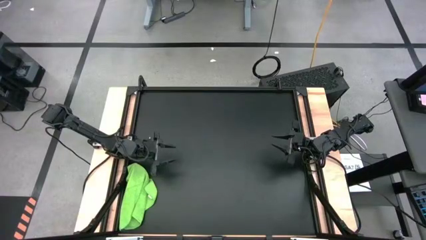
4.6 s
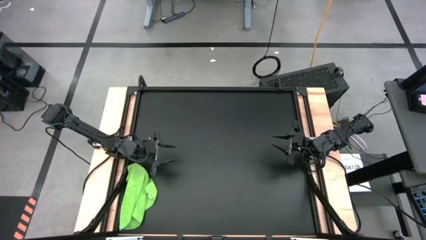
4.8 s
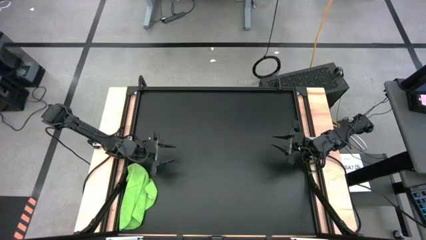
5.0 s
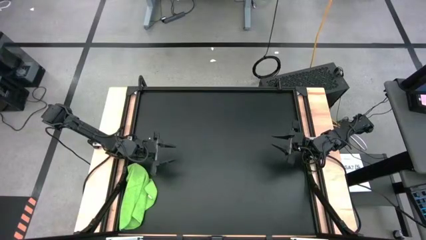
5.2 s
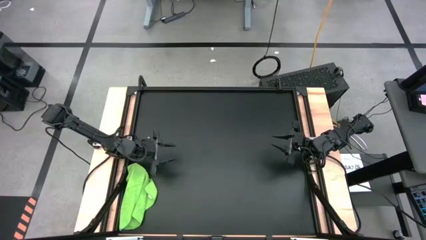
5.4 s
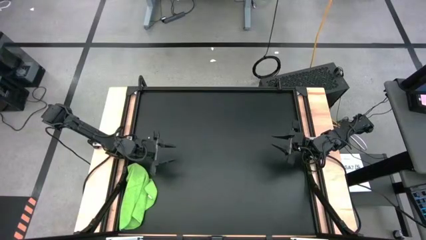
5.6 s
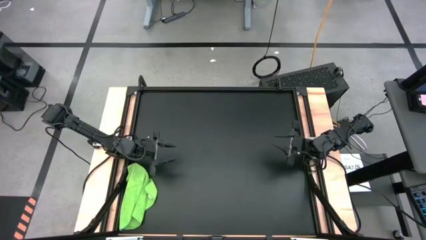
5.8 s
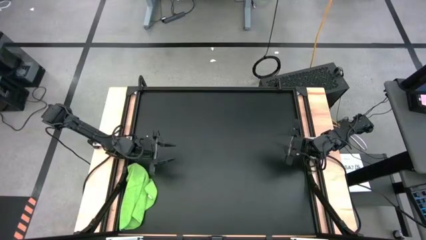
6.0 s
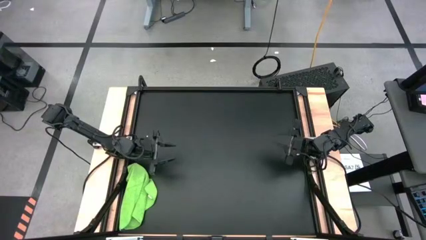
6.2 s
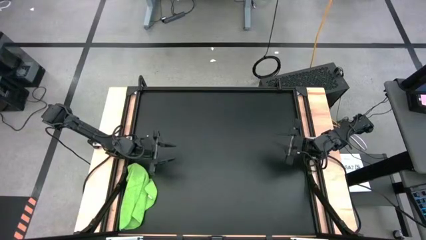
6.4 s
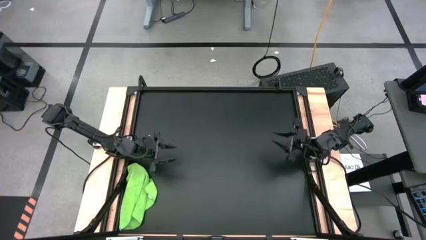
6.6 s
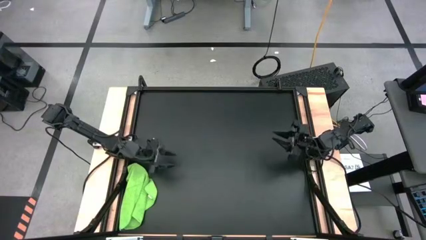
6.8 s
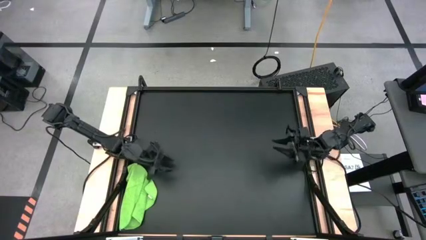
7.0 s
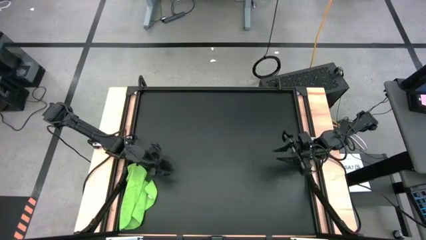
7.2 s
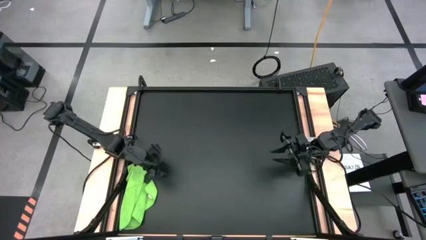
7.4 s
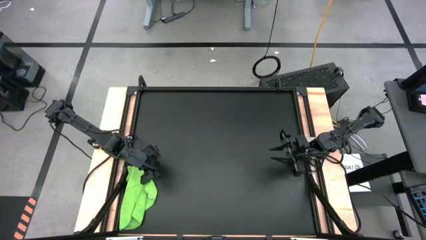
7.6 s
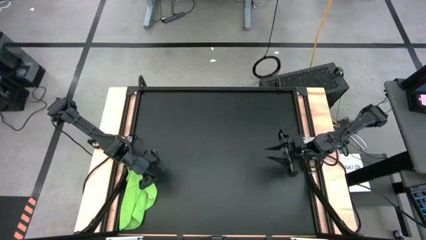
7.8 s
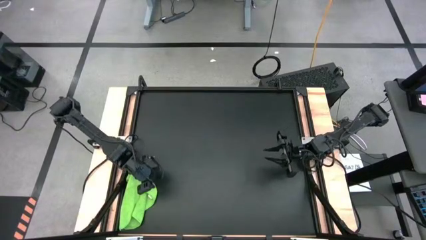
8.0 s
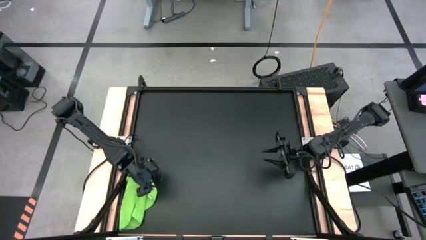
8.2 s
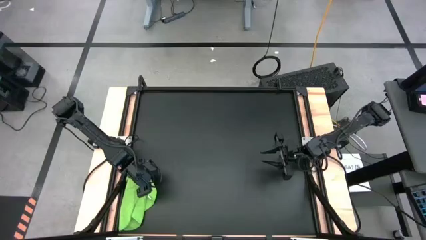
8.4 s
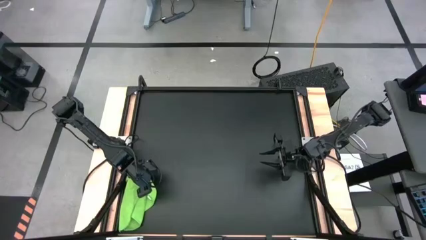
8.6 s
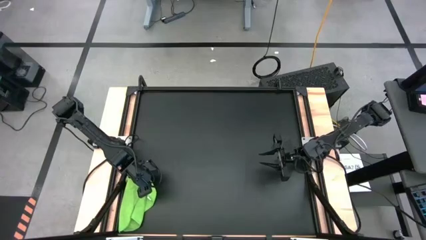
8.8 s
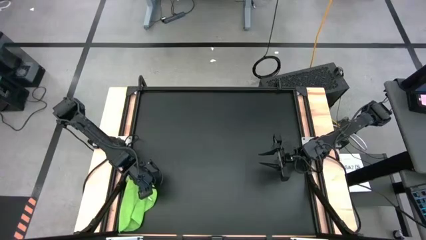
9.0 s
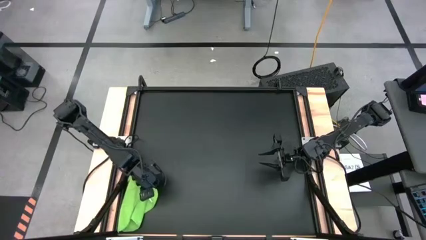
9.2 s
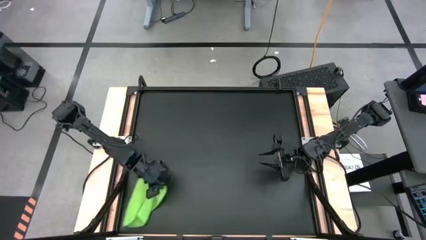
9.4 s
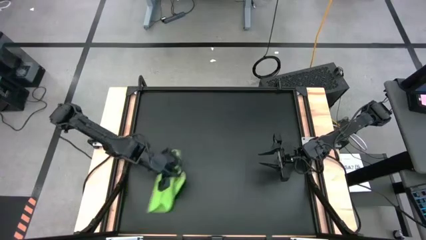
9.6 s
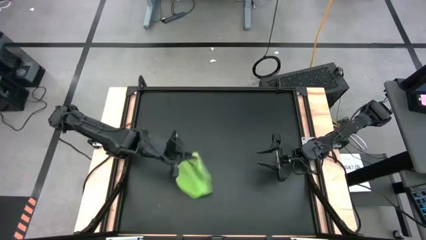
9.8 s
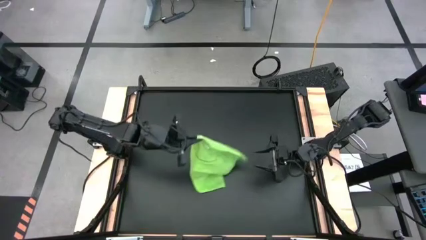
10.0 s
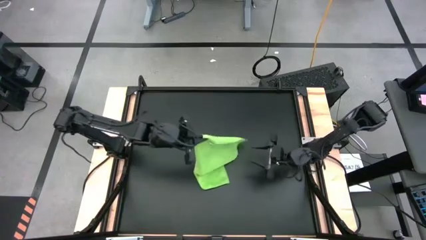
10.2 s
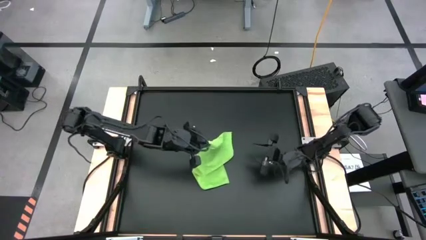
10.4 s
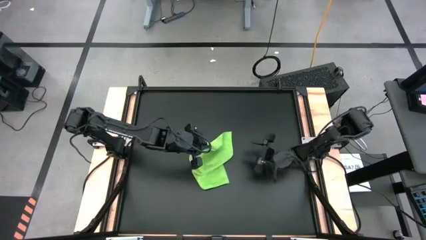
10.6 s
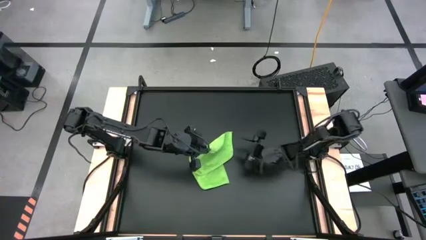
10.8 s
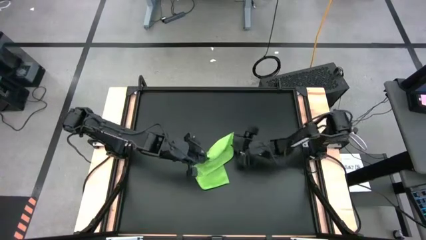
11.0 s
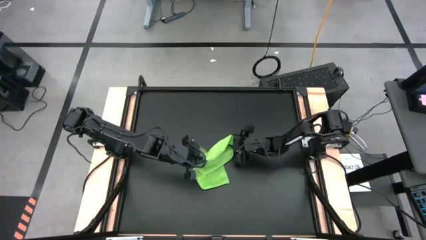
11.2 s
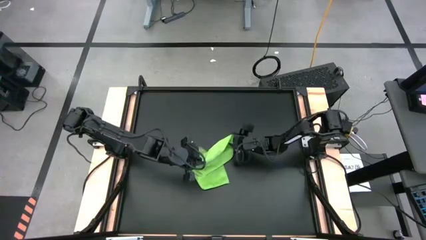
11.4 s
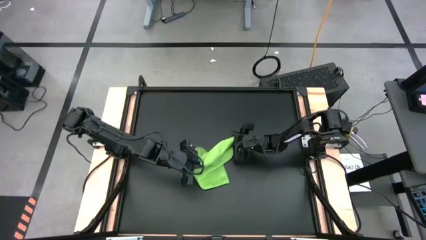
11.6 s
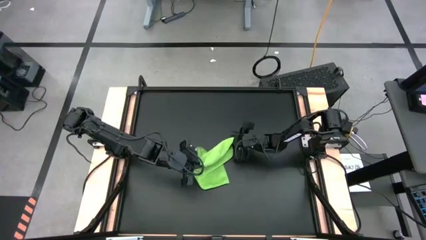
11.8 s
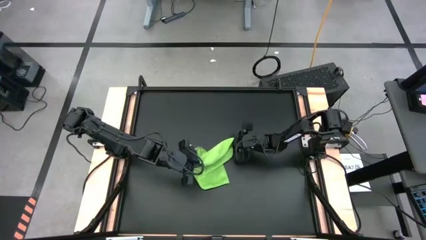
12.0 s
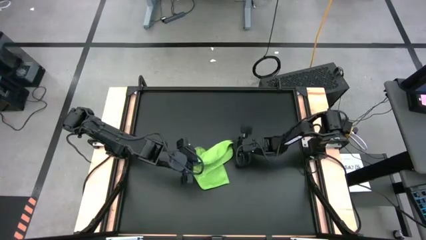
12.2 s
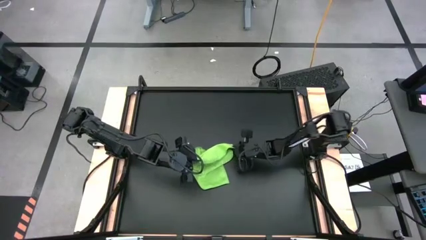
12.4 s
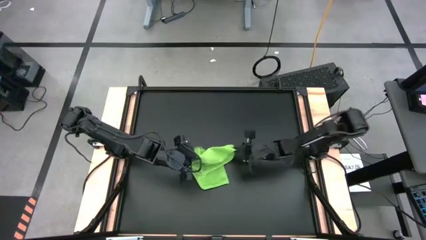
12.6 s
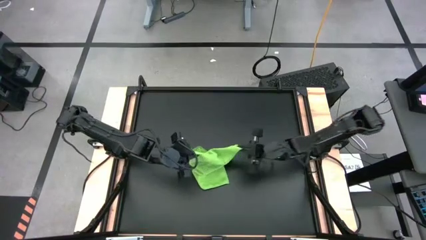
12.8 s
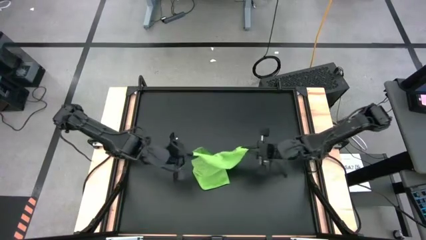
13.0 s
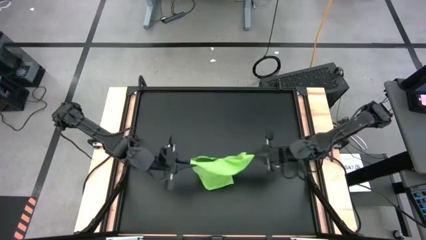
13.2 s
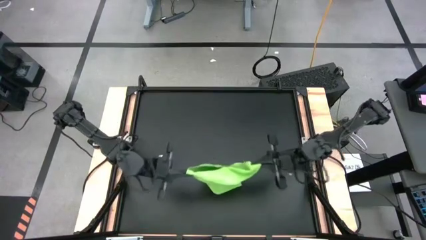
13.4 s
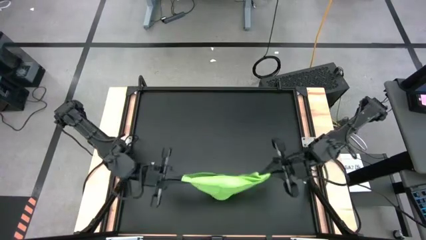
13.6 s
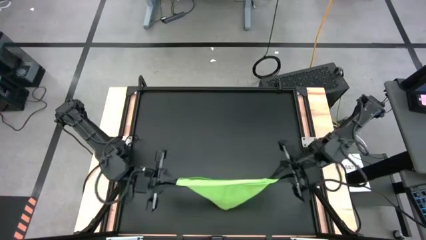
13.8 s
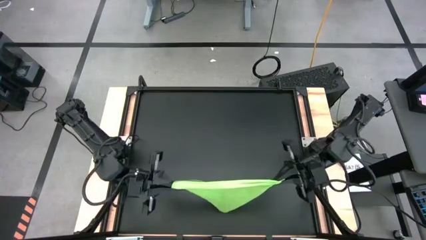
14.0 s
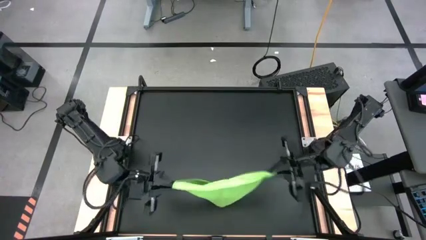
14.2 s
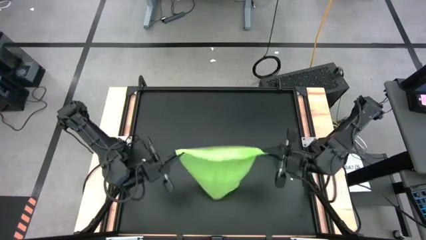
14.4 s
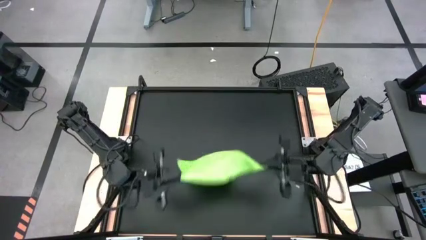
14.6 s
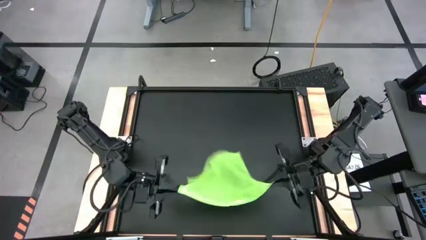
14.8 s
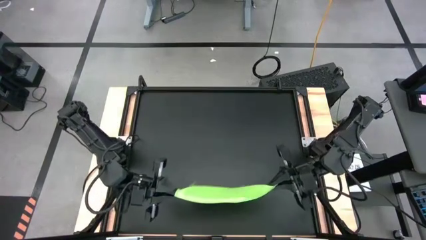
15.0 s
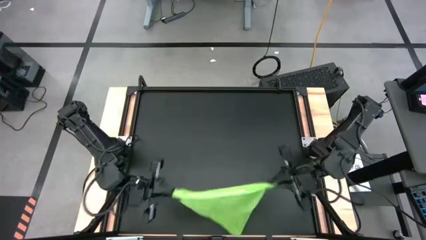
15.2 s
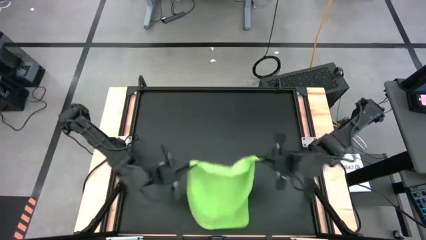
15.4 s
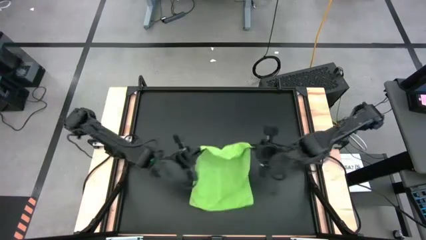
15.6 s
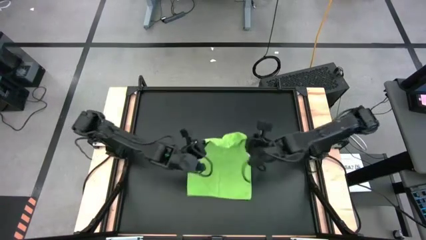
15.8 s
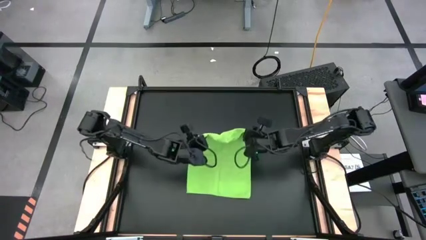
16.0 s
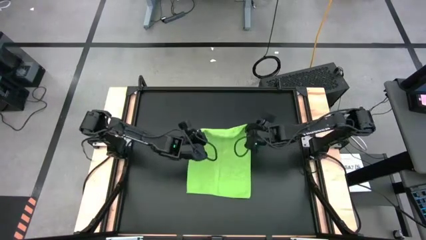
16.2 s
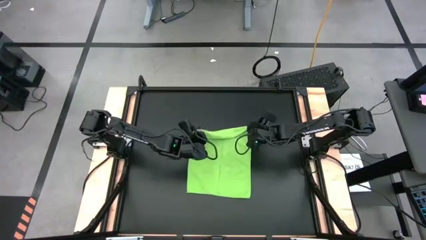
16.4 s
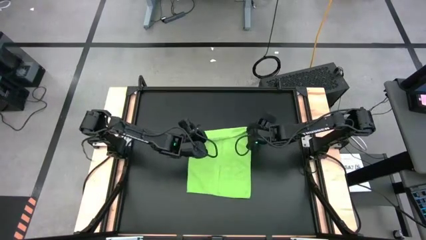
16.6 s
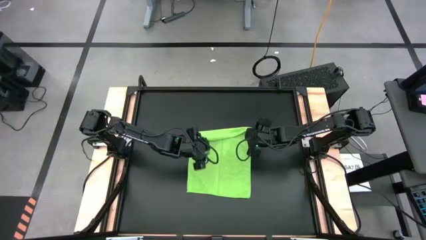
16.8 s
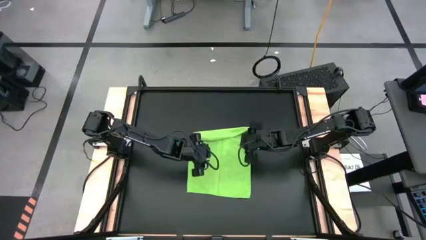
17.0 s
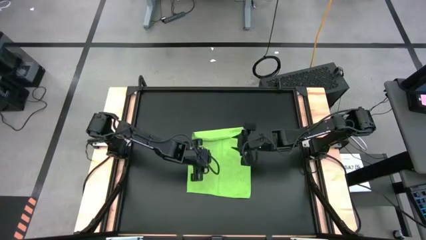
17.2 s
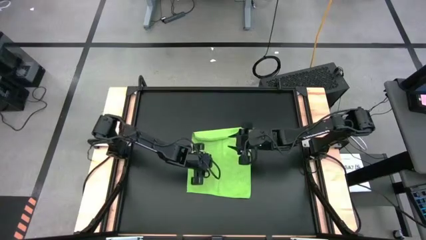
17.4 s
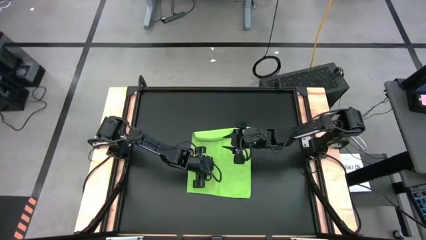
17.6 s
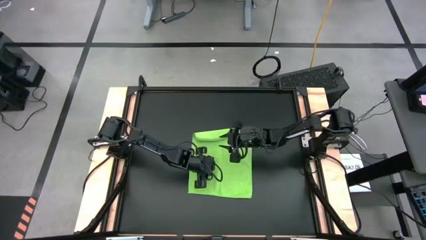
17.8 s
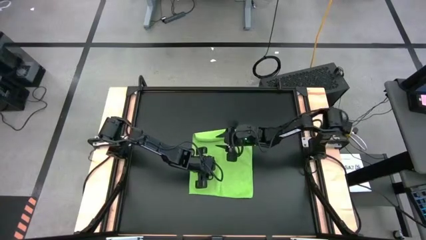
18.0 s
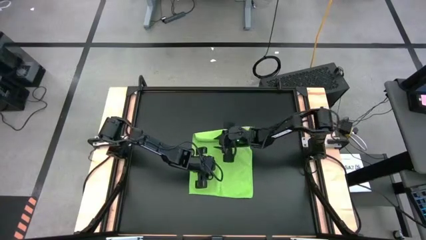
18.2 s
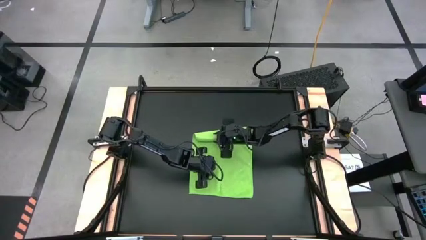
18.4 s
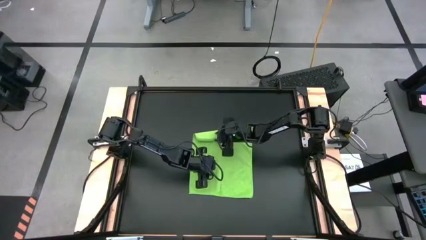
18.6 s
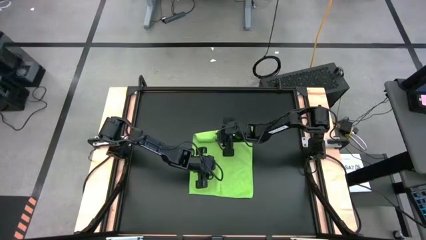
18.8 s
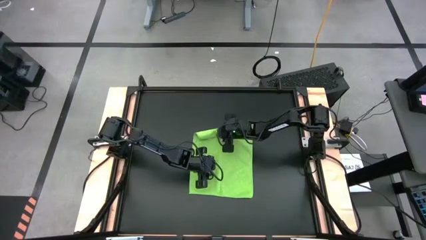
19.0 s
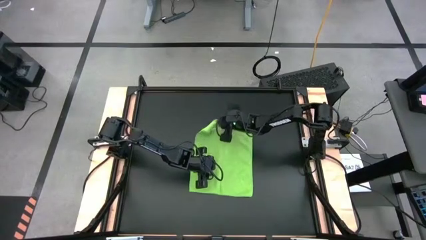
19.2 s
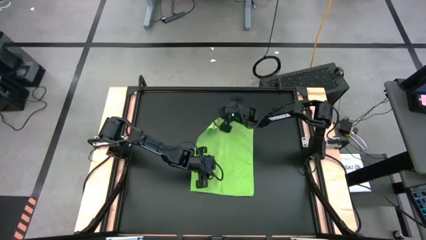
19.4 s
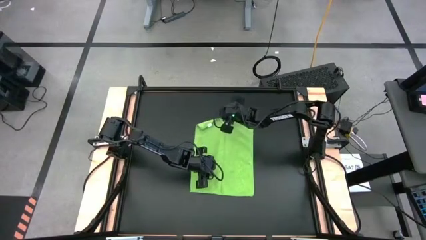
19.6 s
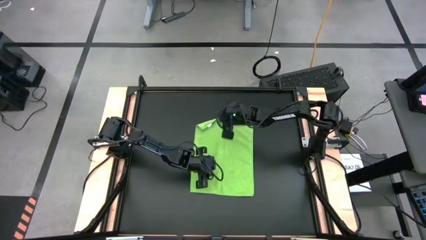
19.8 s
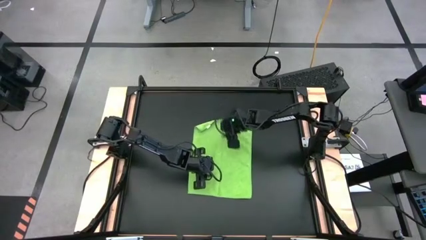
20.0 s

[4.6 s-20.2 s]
Task: Roll towel into tight, uniform cylinder
Fold the green towel
